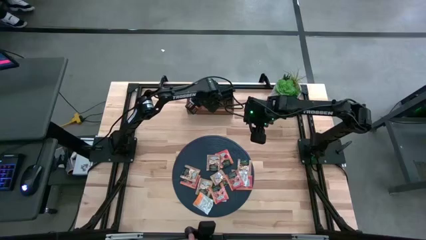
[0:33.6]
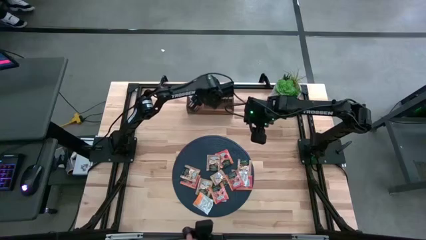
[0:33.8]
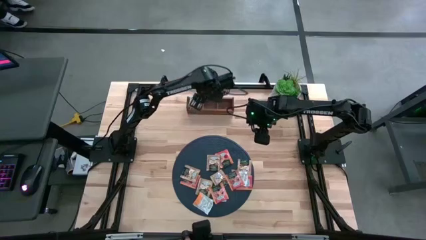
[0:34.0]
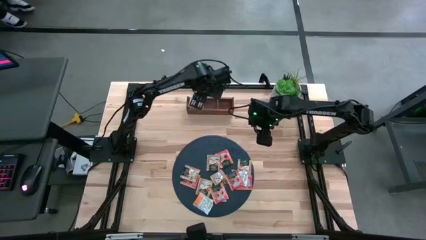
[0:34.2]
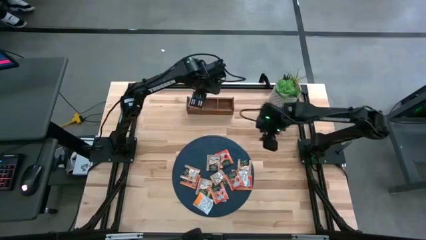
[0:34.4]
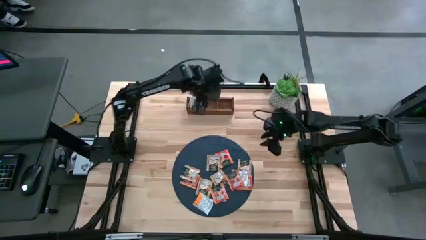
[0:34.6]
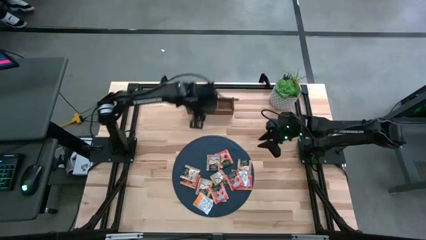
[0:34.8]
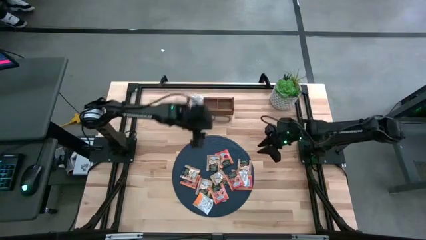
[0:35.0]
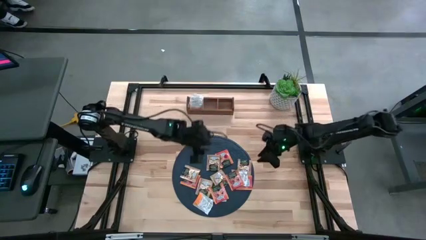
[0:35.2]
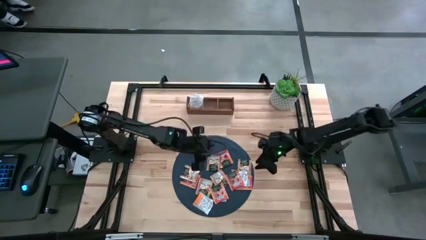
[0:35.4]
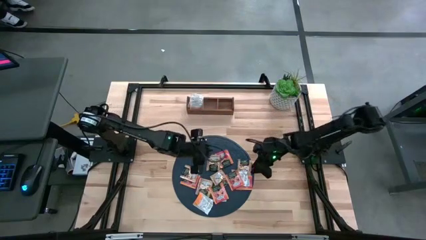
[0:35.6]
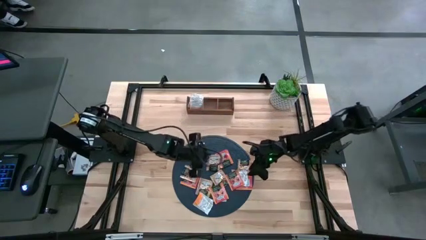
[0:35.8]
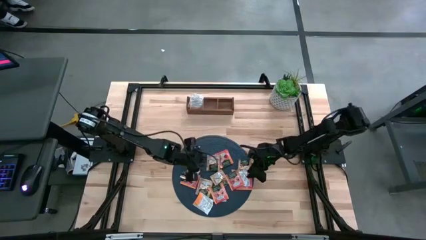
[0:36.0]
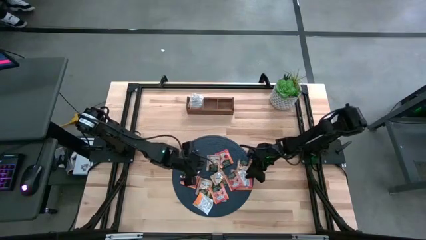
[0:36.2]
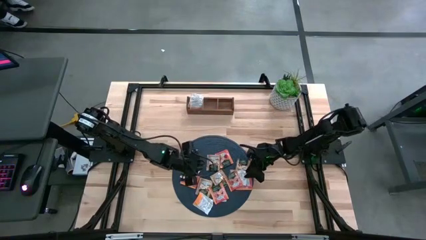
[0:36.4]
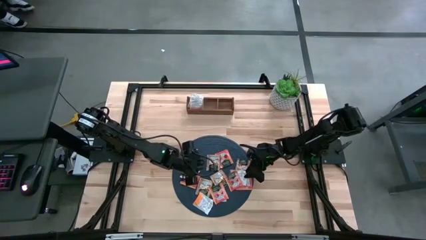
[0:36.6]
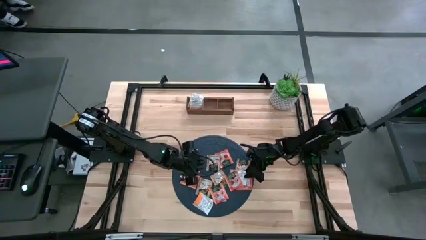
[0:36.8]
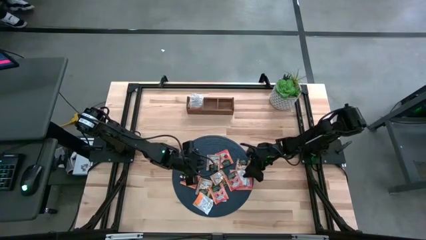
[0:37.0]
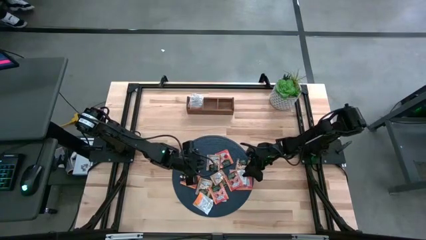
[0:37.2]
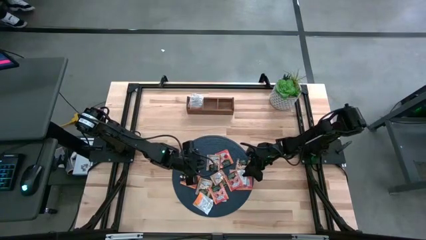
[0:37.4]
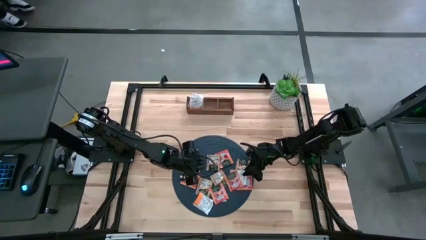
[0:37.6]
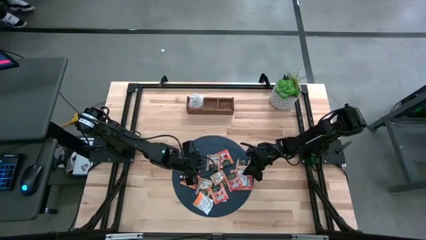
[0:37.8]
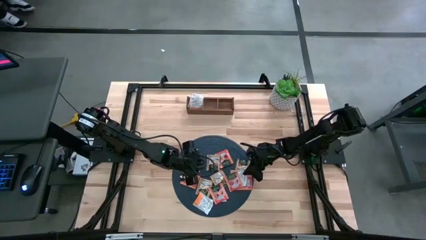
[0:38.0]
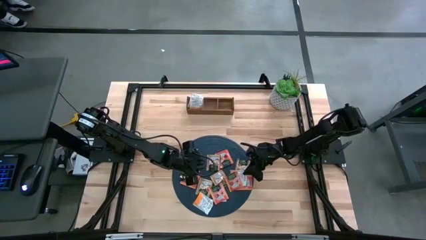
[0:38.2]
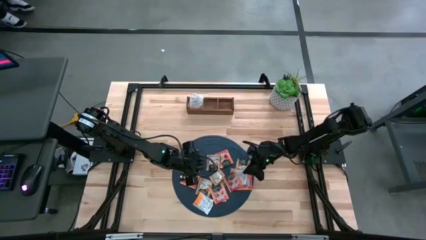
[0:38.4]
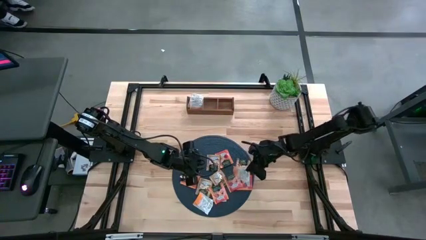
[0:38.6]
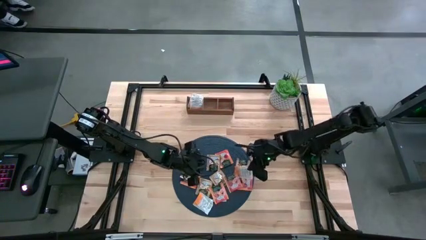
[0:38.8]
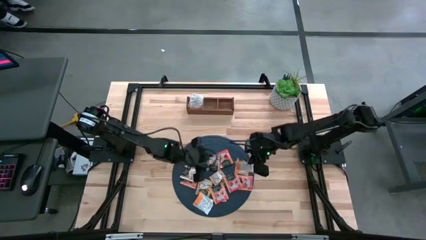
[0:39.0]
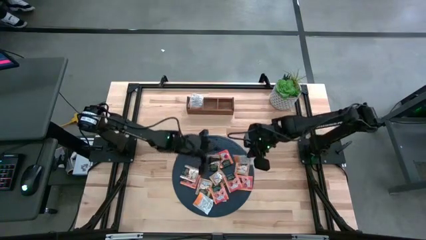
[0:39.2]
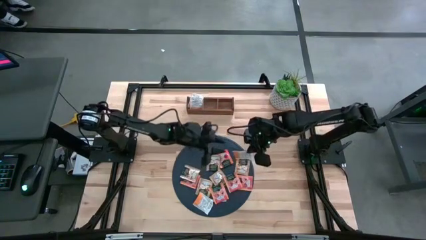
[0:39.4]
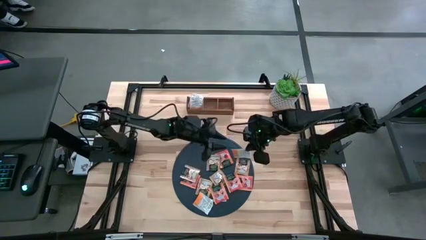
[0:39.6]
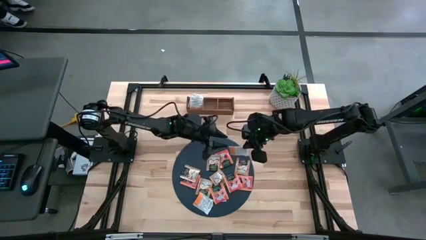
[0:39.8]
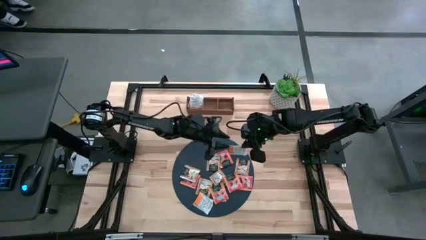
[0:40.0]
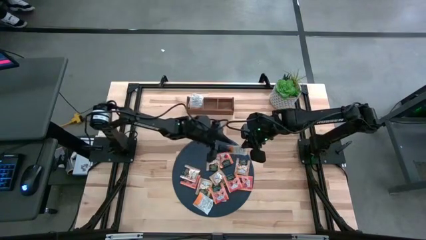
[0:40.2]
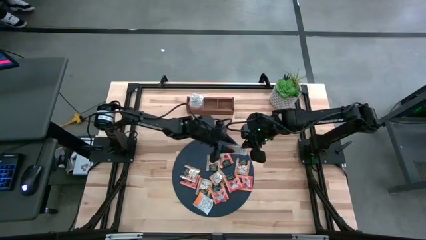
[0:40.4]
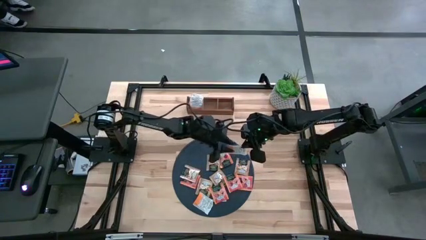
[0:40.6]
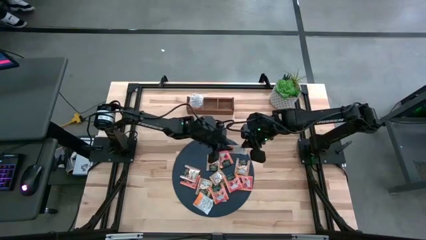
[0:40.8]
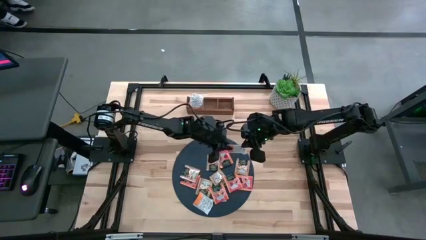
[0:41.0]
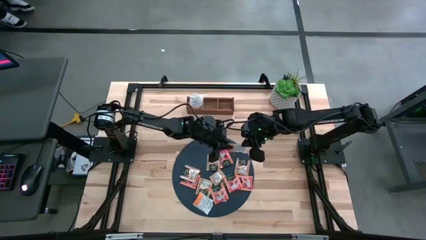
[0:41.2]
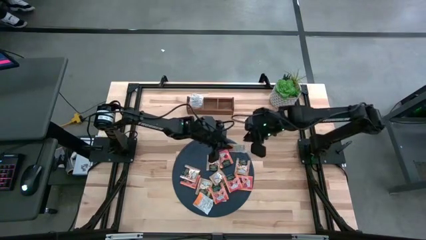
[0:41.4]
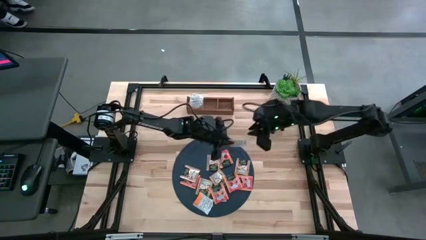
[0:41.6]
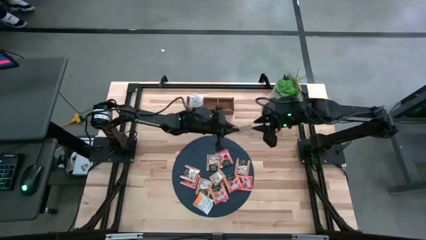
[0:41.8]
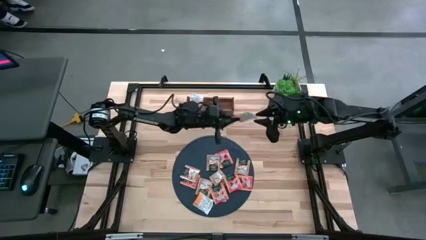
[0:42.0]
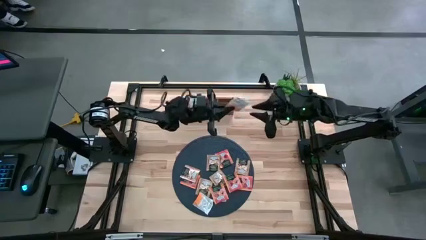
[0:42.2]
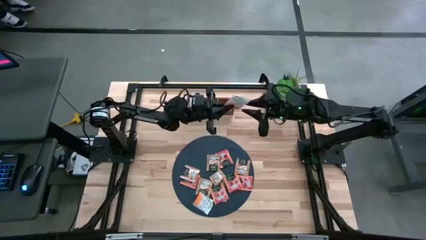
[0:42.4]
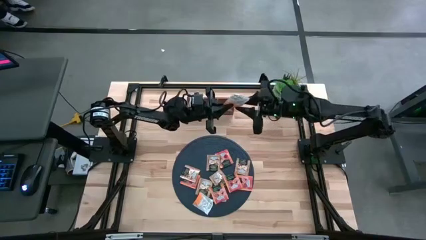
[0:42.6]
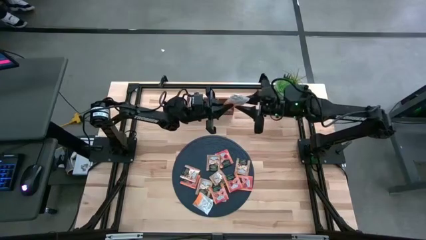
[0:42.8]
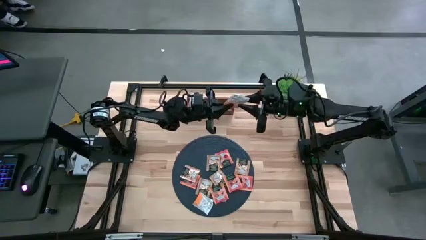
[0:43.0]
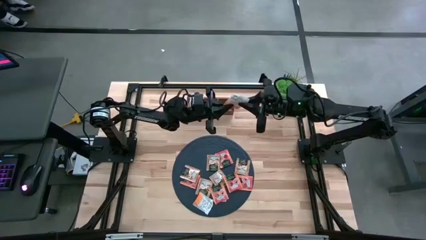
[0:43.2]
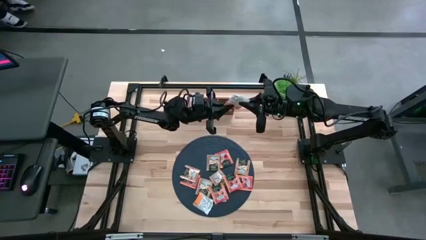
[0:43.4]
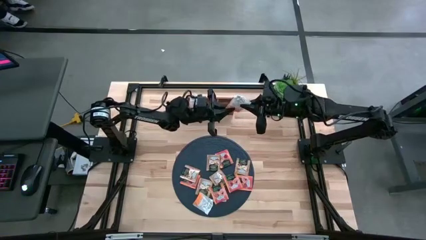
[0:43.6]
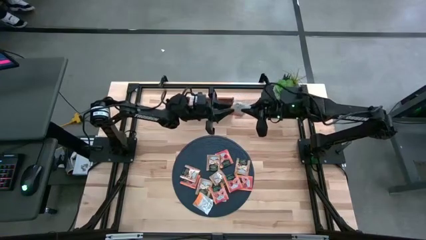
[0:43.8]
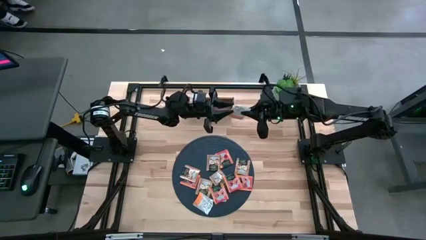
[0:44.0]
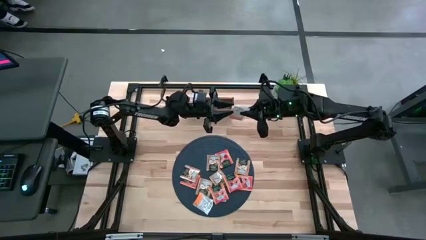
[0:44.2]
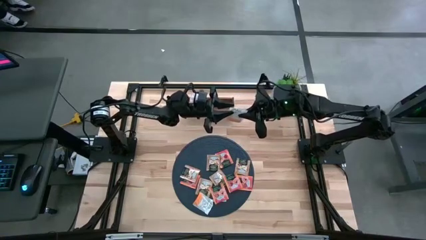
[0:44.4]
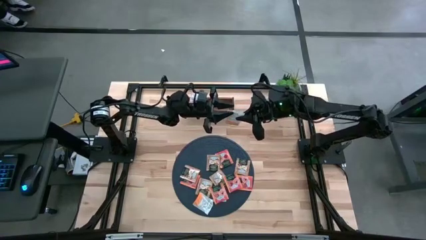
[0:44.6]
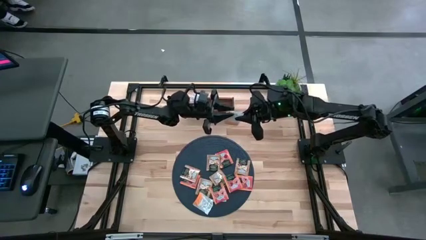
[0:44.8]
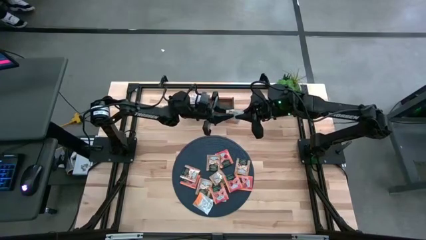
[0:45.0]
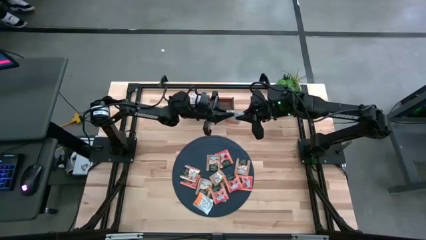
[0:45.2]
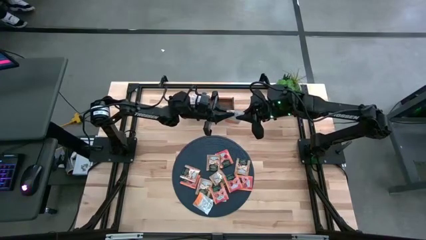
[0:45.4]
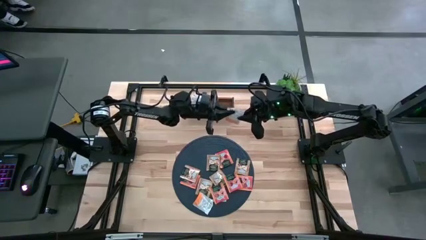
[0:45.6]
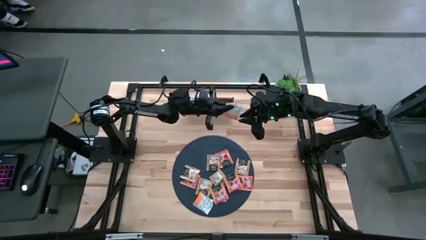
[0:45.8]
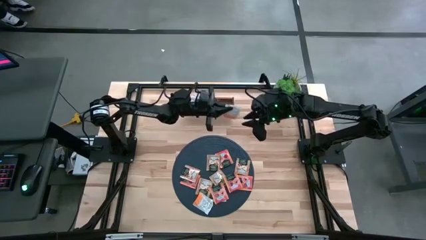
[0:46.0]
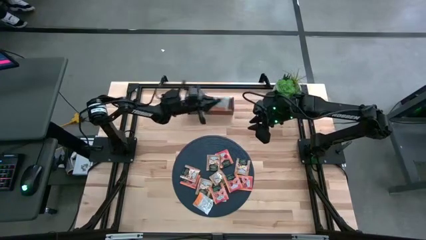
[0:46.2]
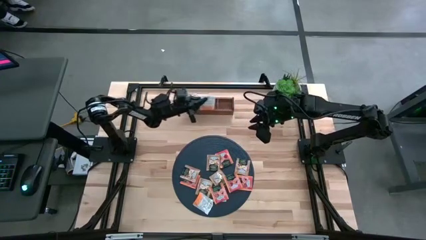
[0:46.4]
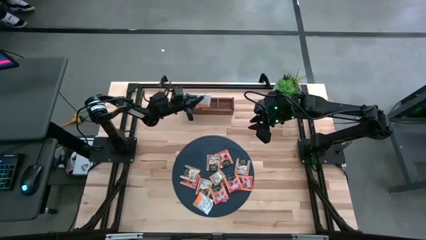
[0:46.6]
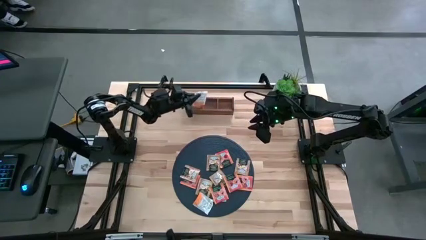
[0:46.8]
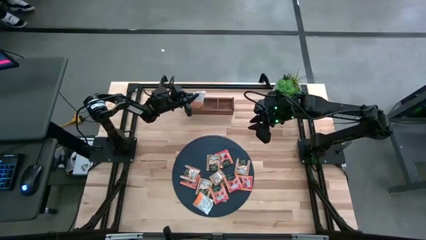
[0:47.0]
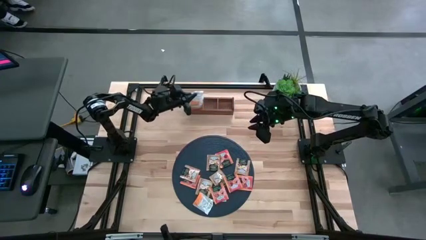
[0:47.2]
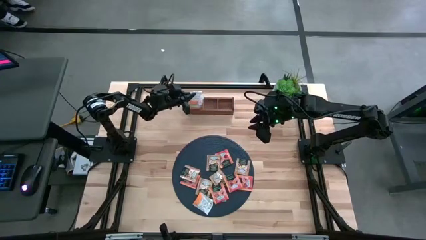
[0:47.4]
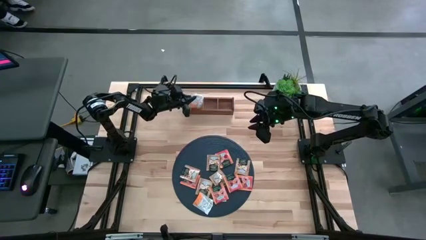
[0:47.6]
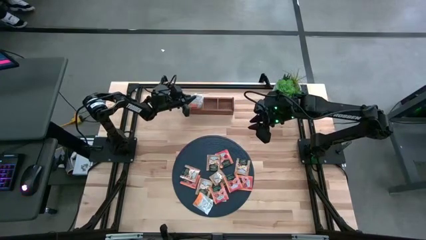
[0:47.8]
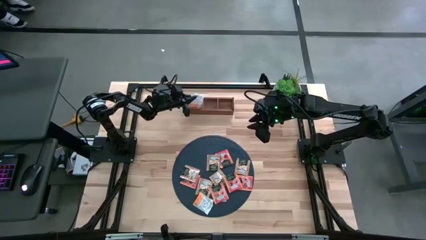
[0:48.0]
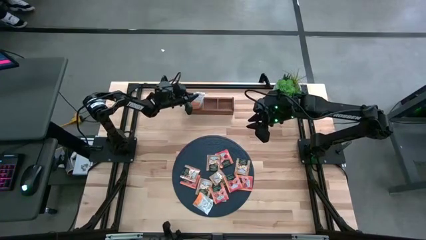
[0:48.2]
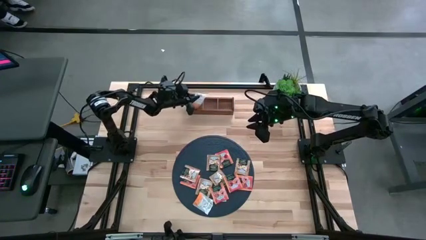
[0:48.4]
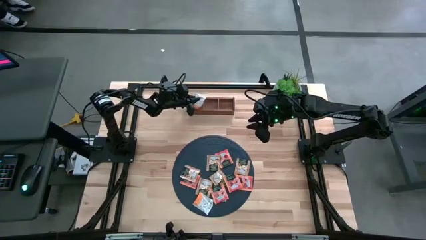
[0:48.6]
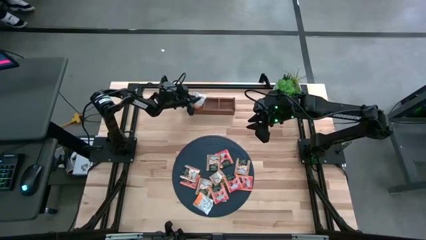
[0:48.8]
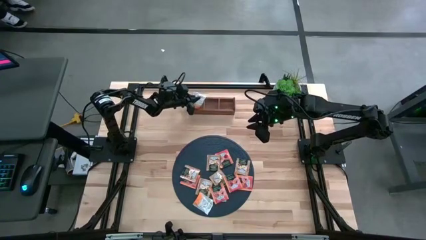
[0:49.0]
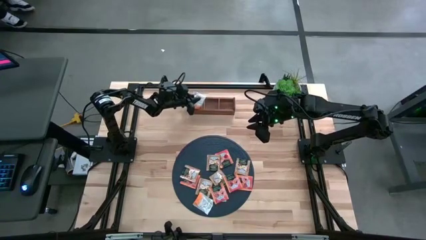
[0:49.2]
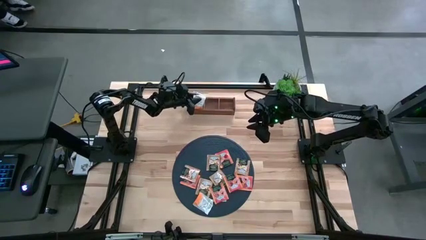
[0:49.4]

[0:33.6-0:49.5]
Task: Pick & Place Tea
Put the white tea bag into the left section of the wooden organizer
